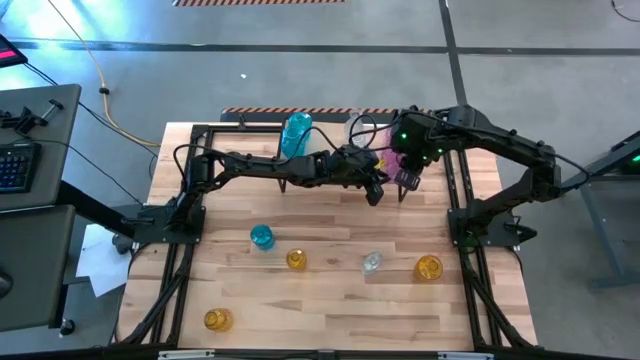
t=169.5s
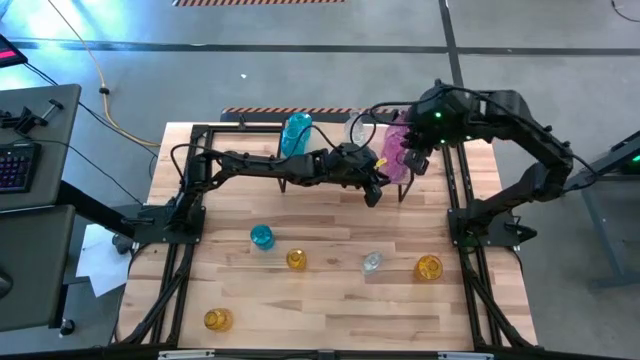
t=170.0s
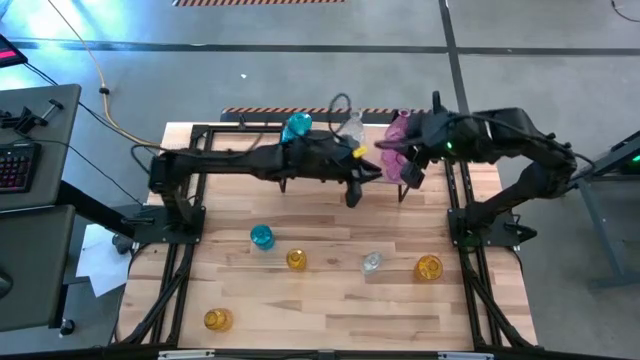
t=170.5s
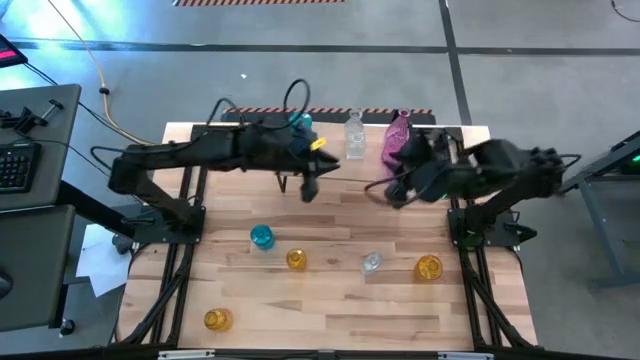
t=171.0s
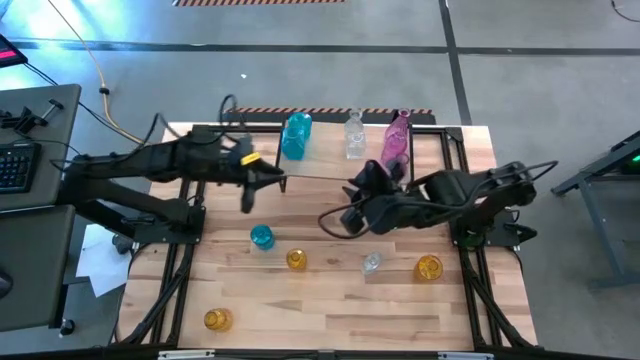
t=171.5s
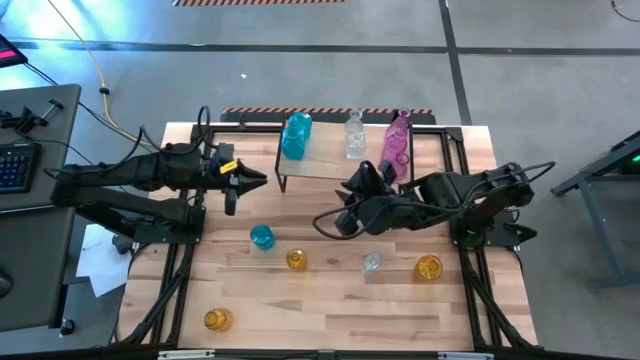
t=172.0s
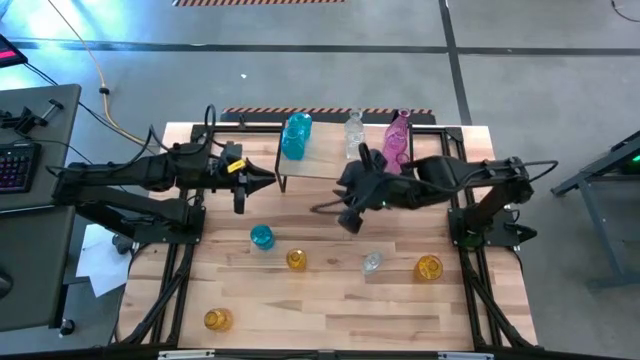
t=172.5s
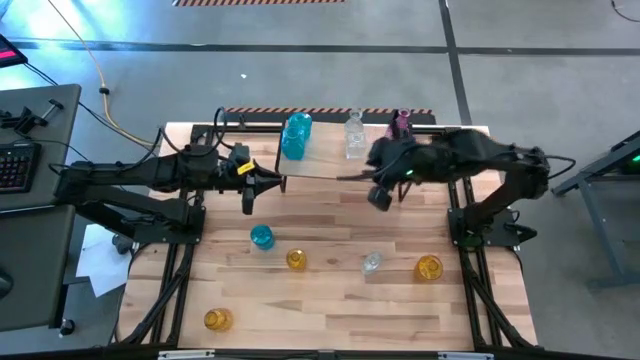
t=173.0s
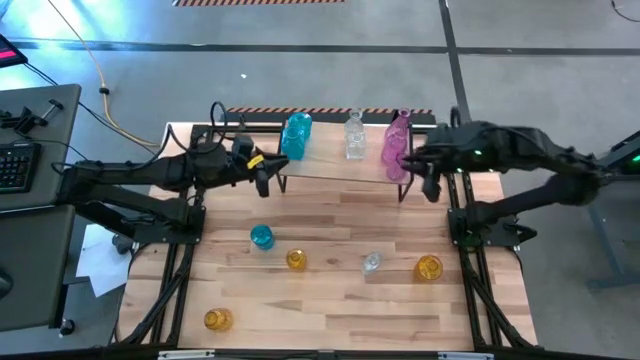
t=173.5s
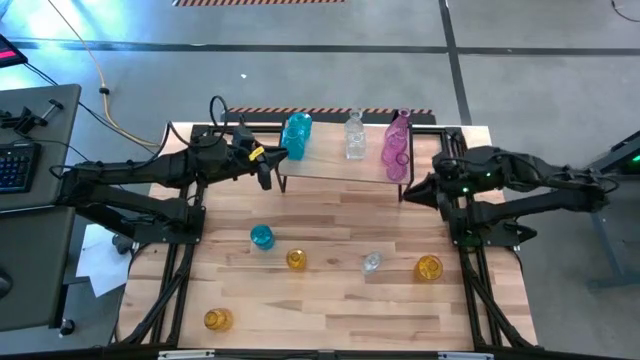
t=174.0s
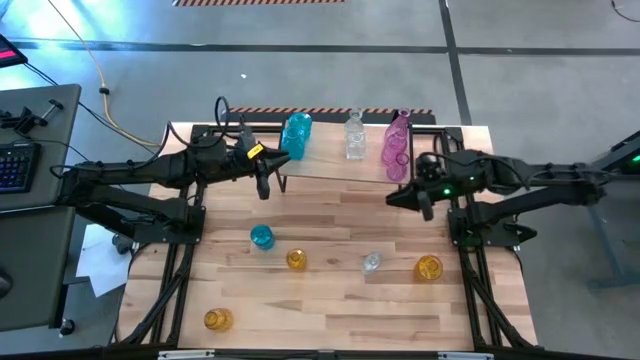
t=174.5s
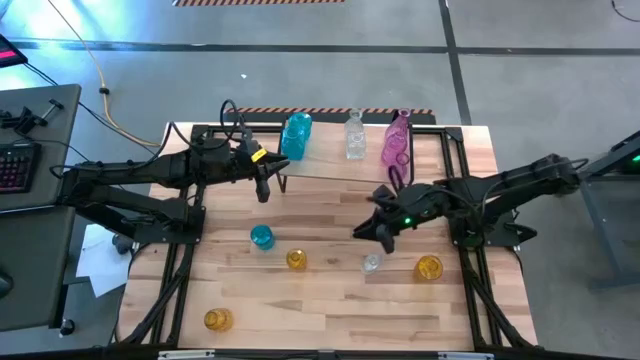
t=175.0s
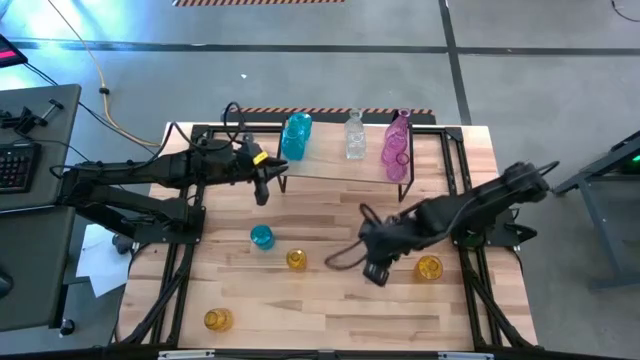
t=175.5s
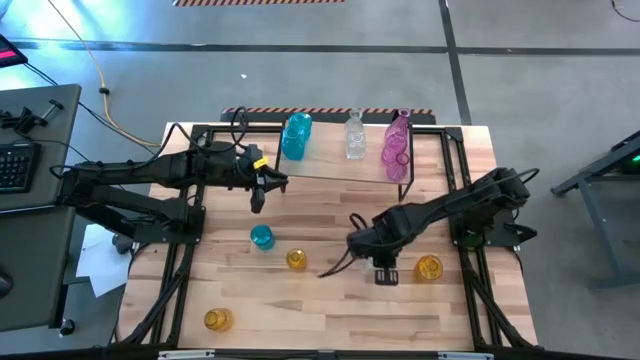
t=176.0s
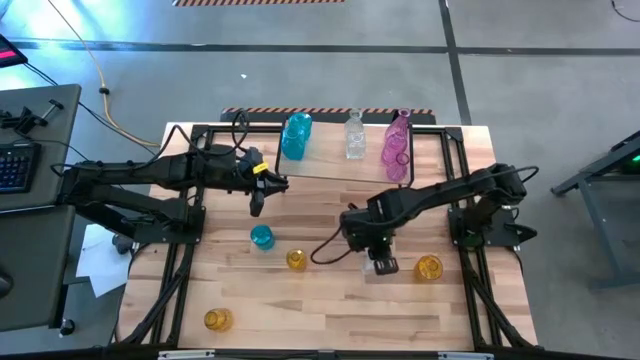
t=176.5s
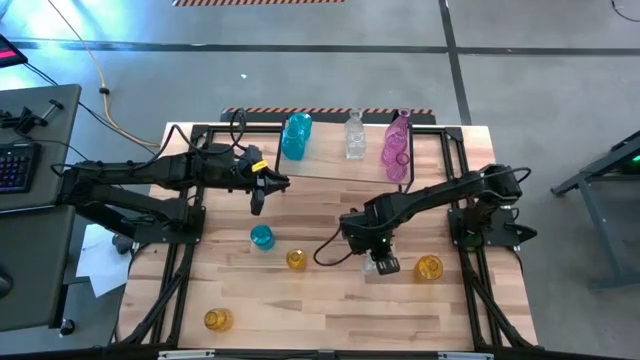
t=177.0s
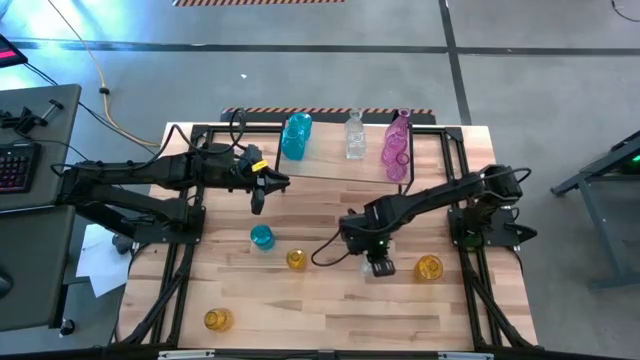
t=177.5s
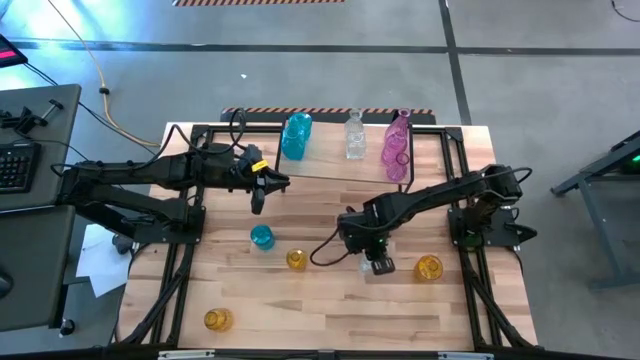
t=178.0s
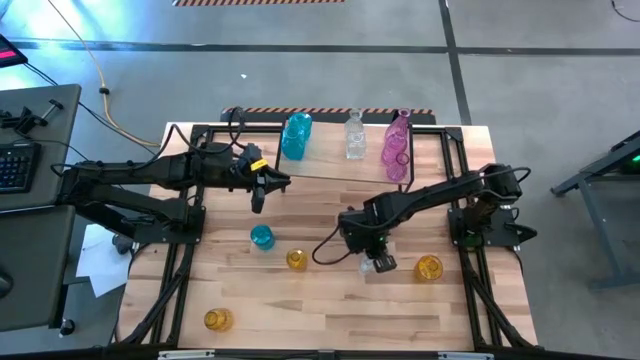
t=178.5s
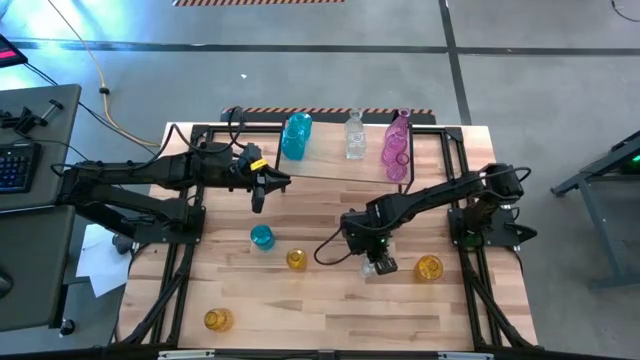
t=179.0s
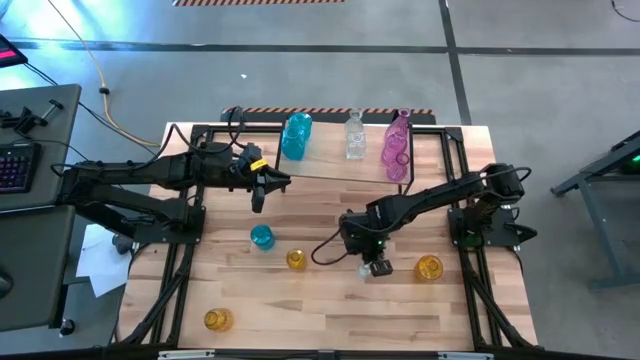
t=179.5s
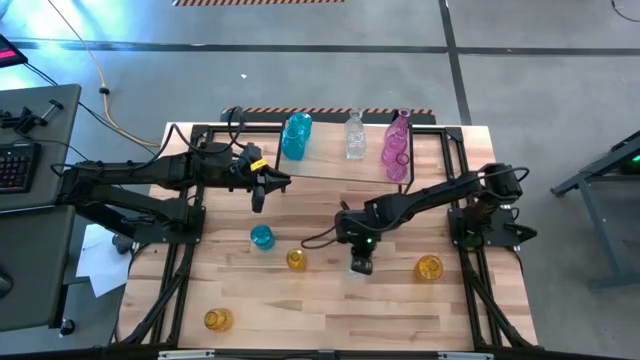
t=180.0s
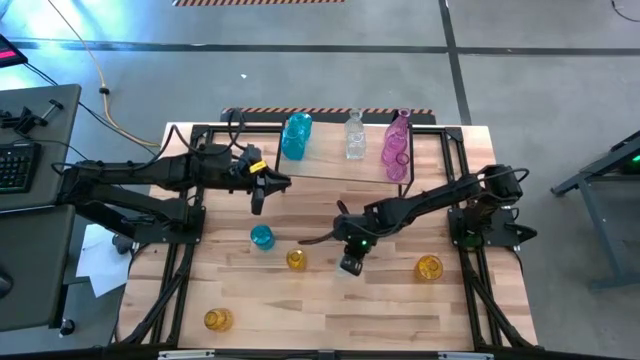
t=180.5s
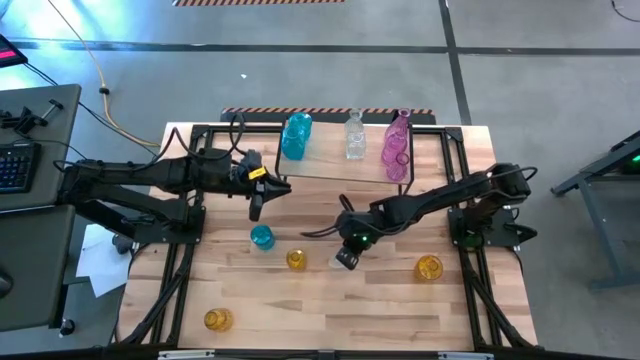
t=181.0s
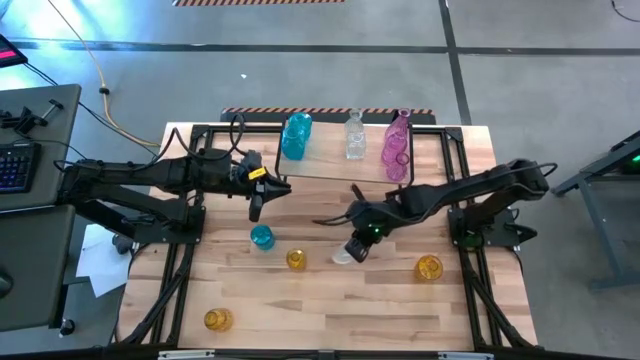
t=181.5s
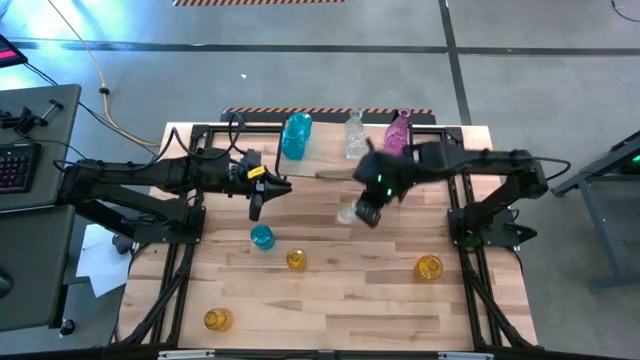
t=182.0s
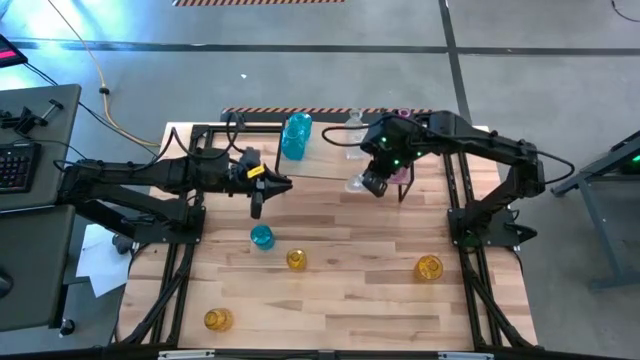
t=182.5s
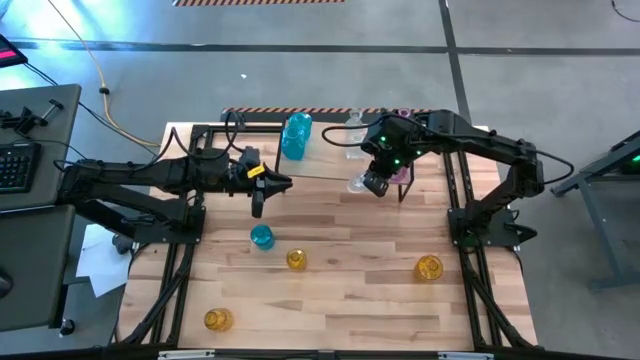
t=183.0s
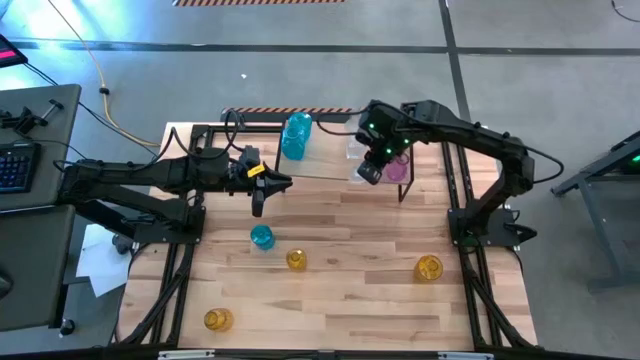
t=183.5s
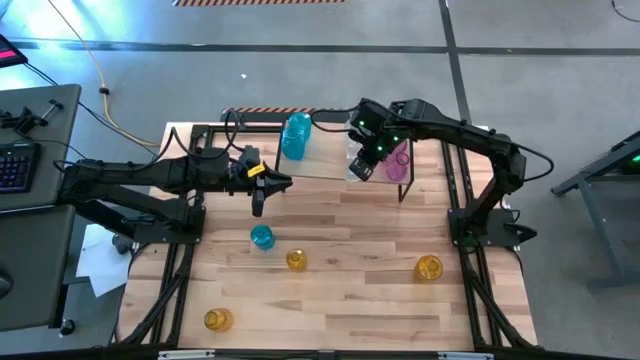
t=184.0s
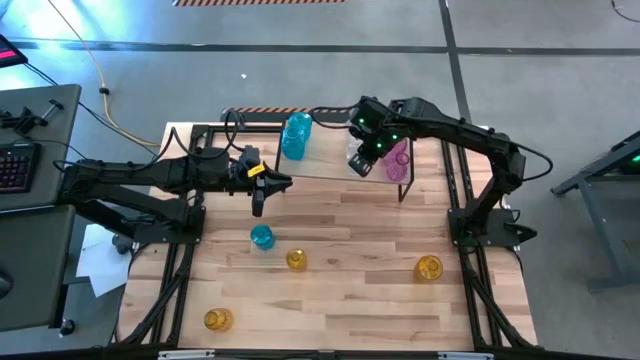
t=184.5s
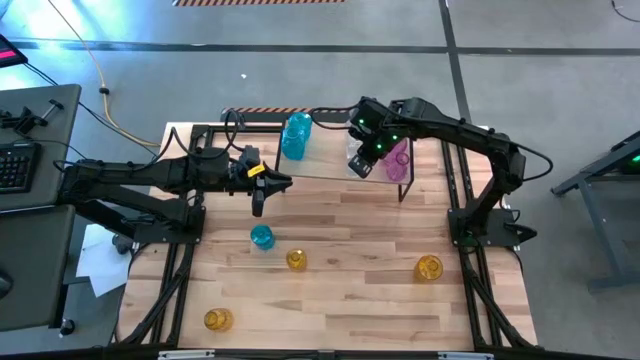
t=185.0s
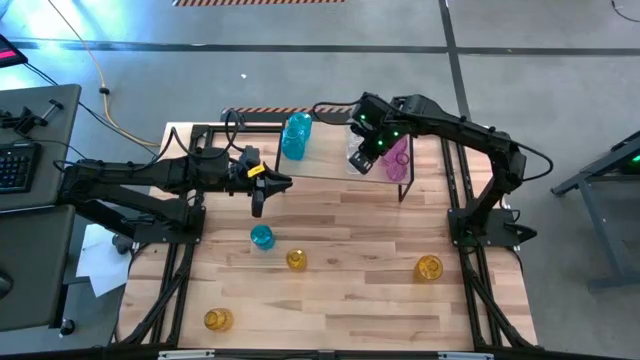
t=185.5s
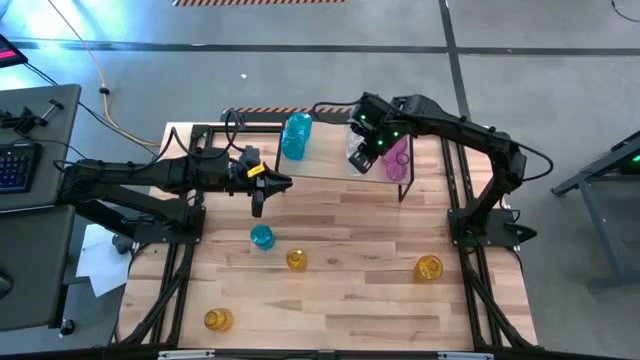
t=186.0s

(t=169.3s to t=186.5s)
Task: sort vases onto shelf
Put the transparent vase on the shelf aligned with the other transparent vases

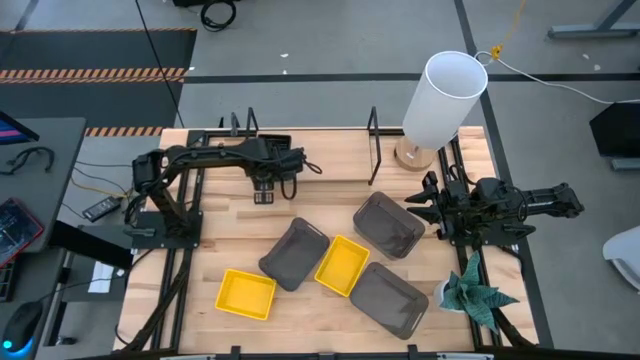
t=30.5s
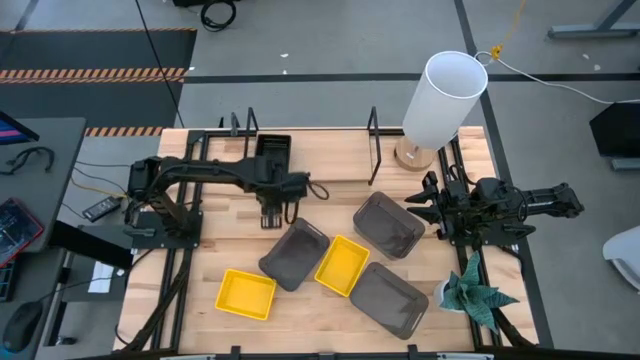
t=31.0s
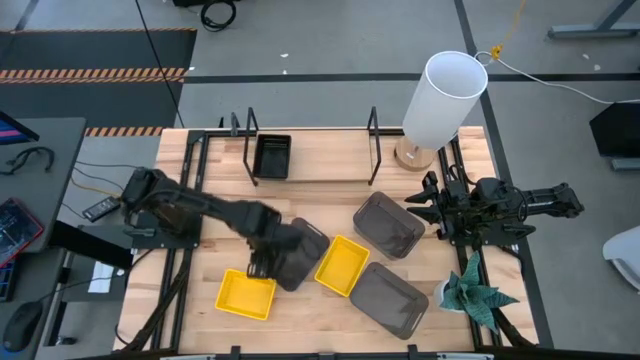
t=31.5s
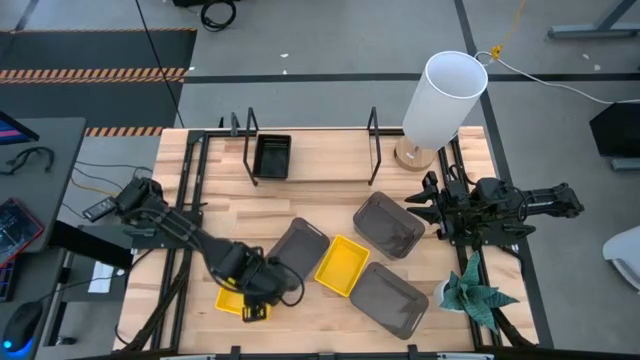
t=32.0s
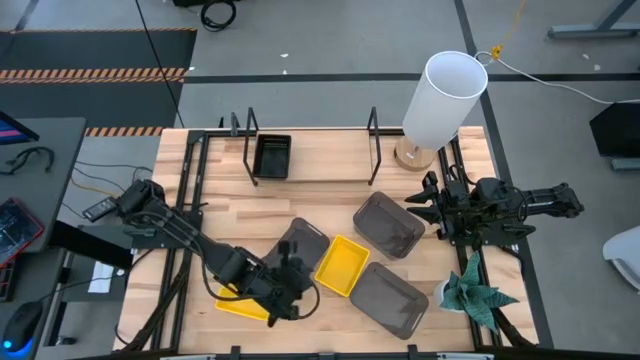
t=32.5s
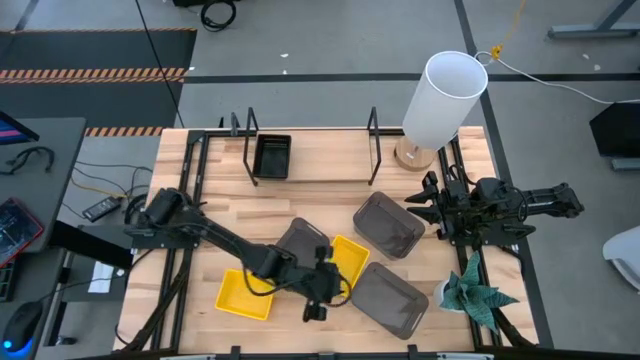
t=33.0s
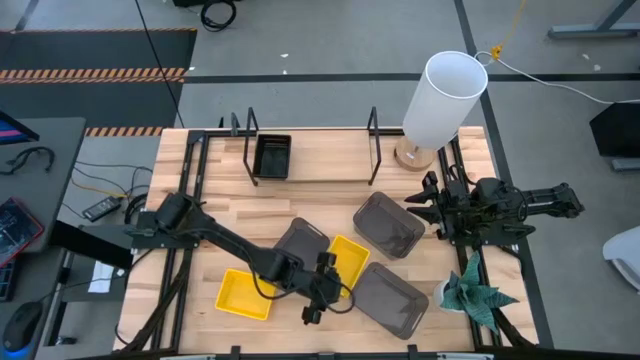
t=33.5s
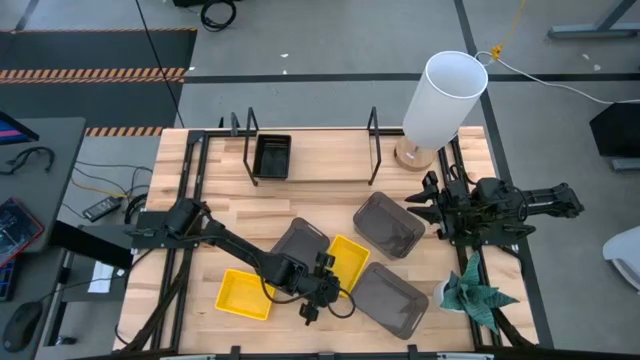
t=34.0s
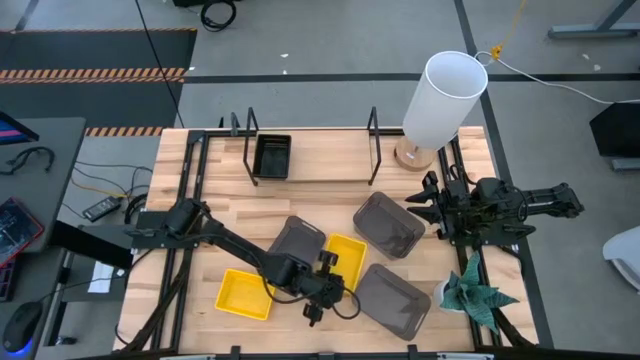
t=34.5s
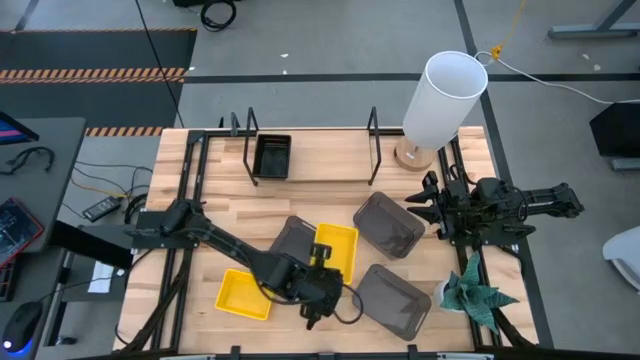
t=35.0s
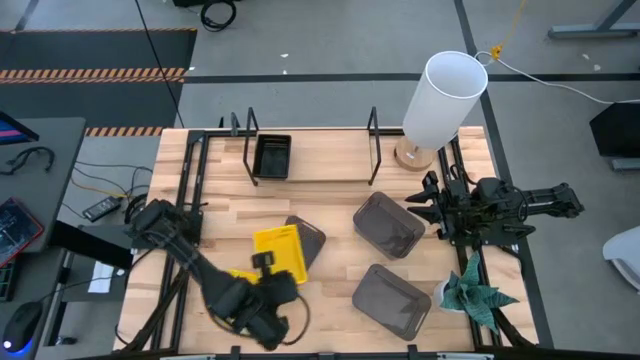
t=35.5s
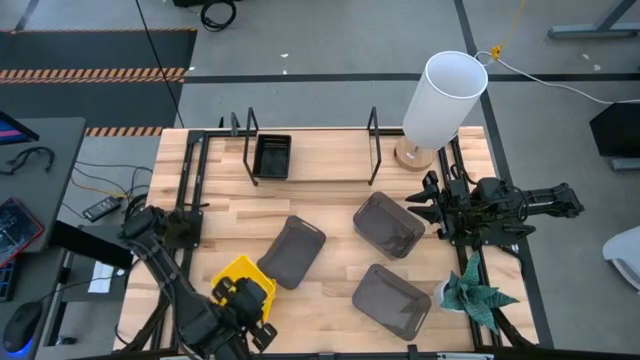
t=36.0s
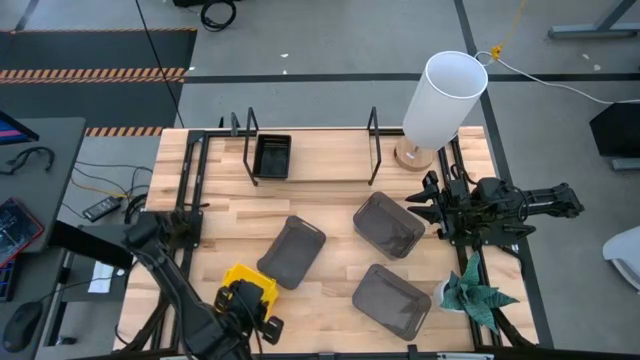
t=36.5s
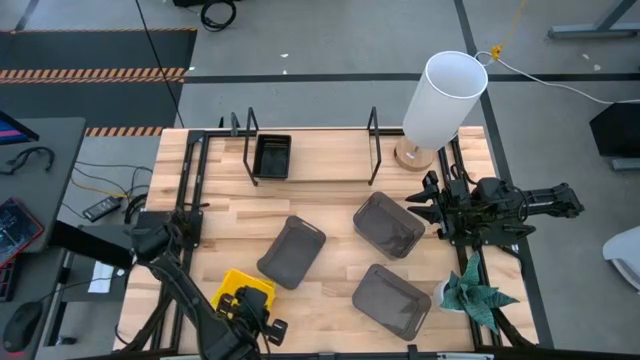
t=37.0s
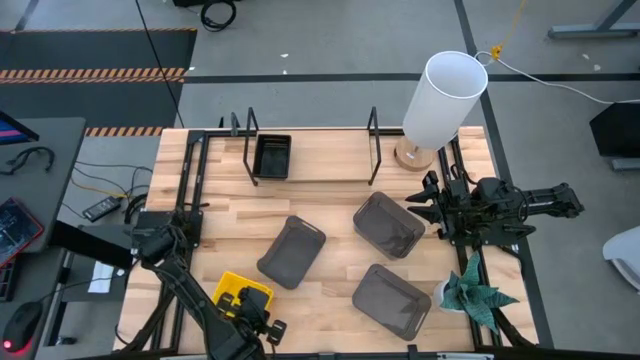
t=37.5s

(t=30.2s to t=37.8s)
Task: Stack baskets on shelf by color
Stack the right yellow bin on top of the left yellow bin
